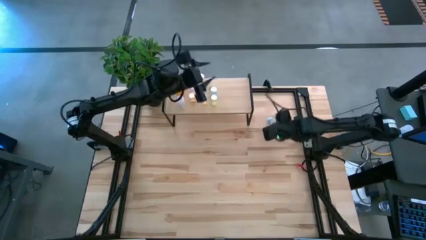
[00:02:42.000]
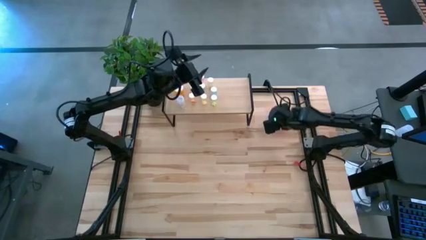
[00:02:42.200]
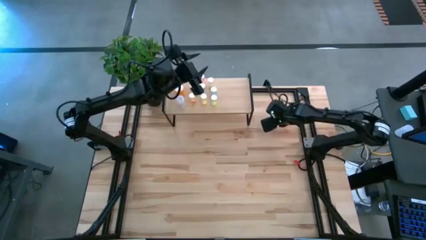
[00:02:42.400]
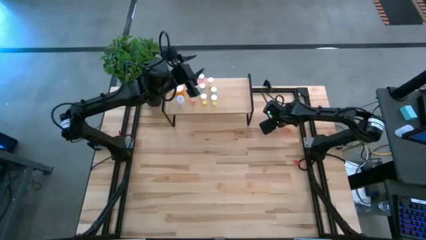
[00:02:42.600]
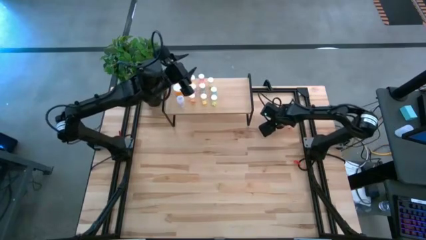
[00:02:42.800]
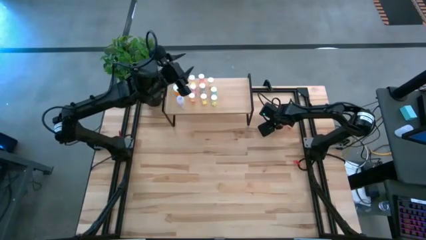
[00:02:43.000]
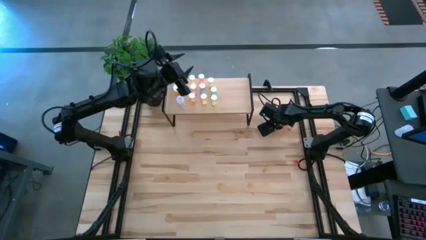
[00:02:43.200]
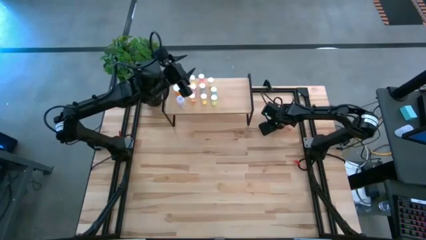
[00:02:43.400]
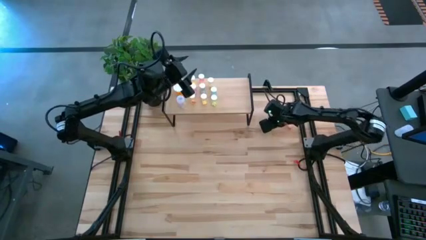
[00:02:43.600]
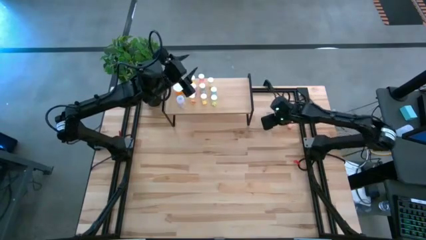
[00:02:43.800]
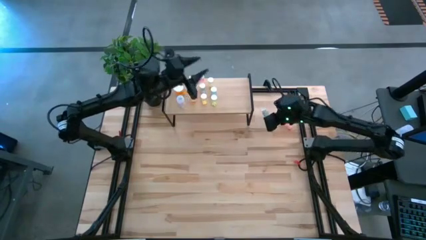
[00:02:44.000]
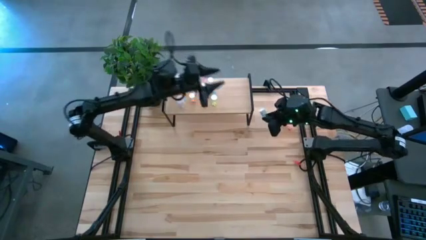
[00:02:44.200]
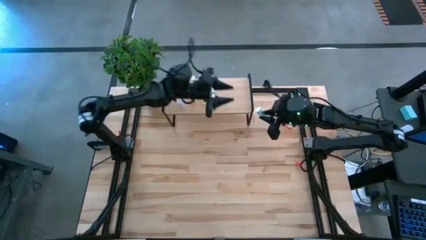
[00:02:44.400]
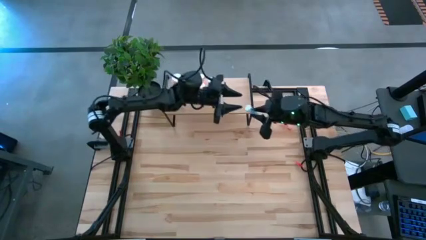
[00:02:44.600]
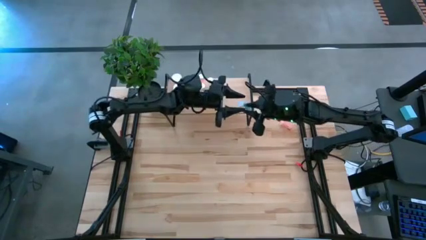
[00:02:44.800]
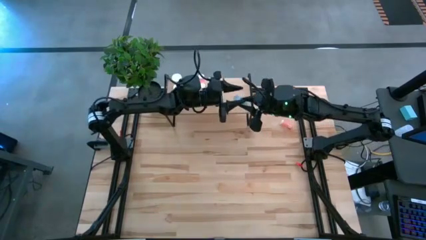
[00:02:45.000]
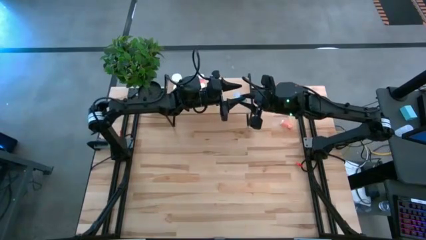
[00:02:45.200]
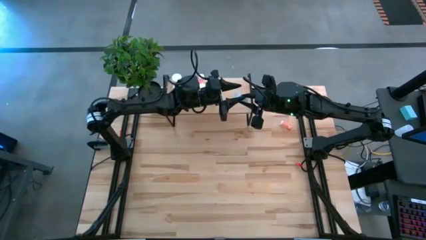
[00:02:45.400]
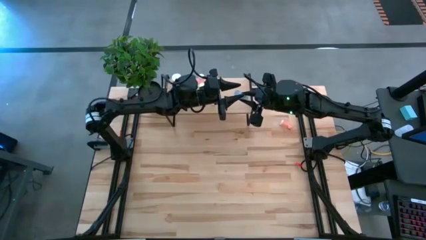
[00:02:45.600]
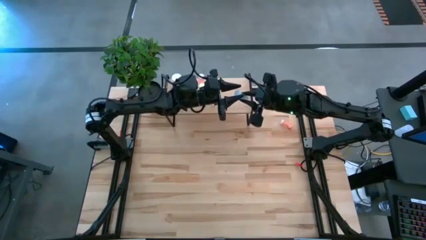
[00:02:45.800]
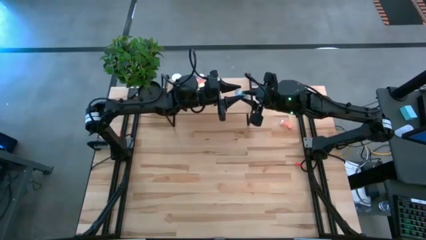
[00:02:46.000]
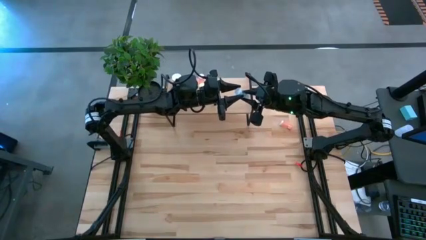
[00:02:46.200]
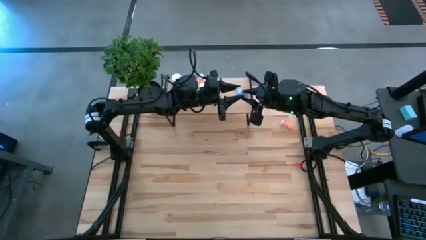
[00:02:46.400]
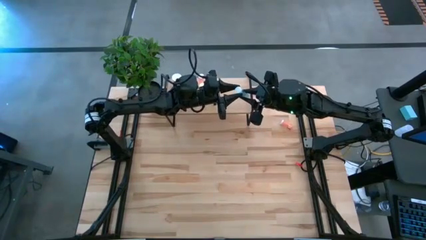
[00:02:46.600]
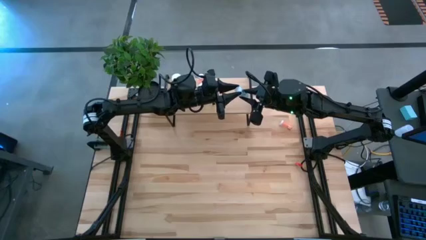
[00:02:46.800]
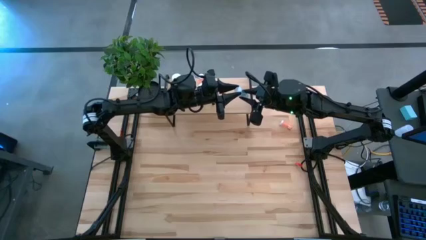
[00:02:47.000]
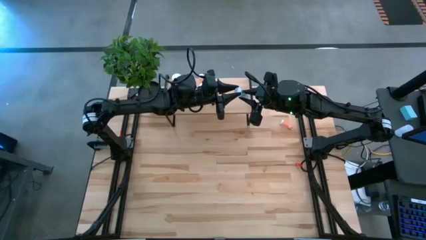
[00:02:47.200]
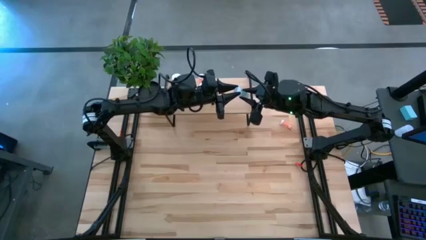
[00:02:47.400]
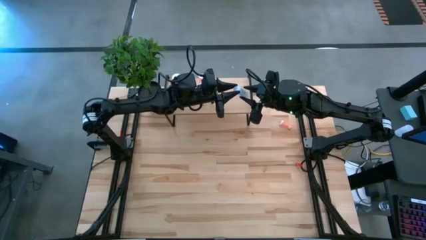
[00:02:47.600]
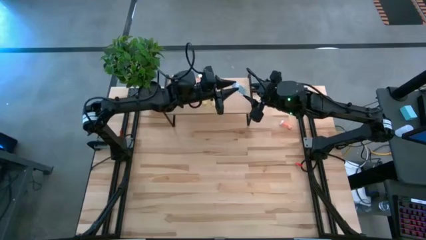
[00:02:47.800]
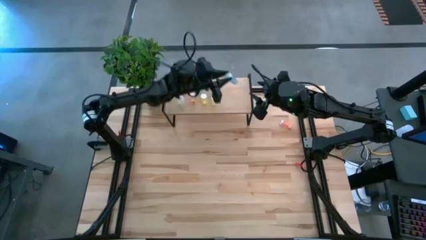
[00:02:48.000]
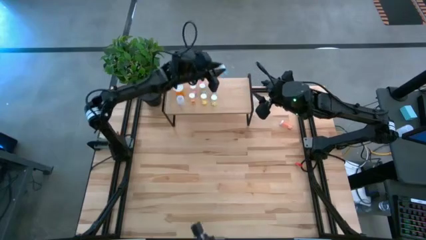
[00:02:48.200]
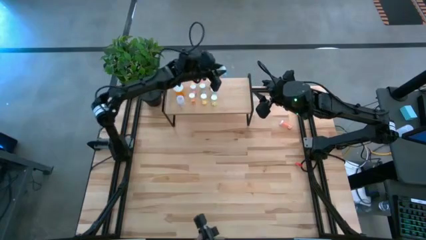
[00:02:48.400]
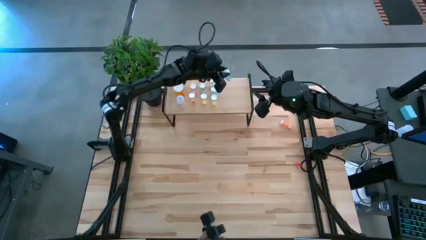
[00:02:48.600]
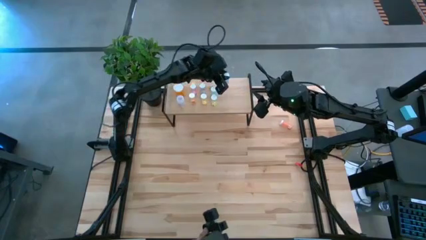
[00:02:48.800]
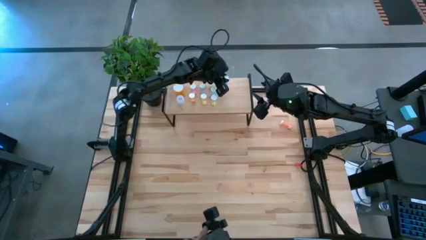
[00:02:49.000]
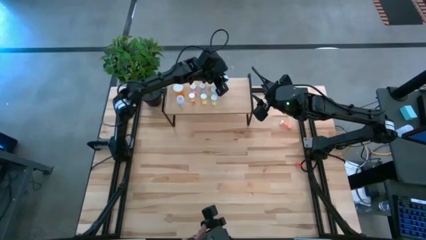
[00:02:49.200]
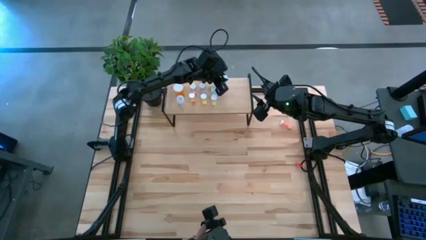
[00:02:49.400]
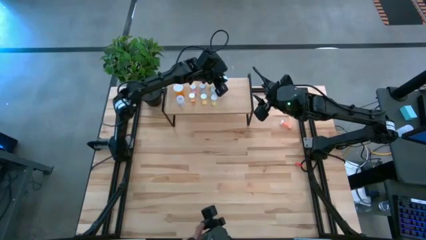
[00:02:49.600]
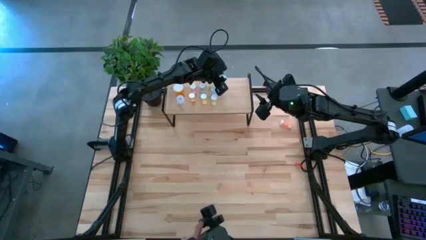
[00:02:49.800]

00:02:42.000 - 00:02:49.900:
Task: Pick and place medicine bottles onto shelf by color
Put the blue pill bottle on the shelf

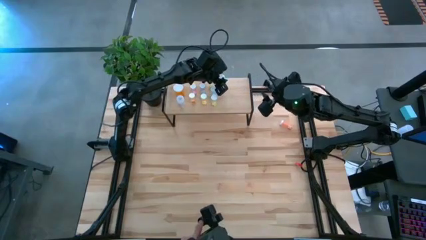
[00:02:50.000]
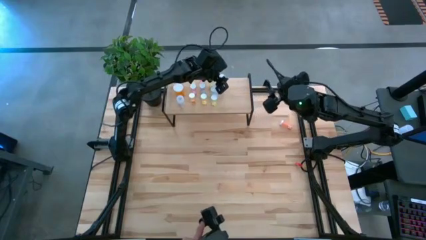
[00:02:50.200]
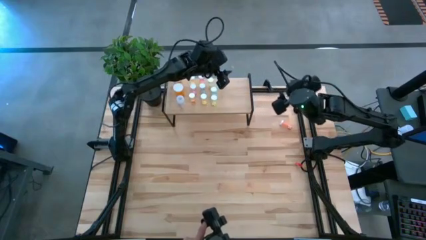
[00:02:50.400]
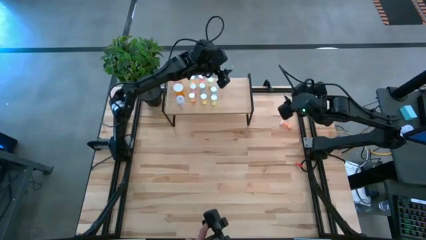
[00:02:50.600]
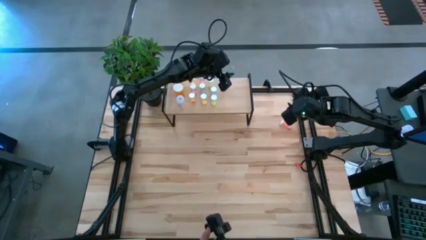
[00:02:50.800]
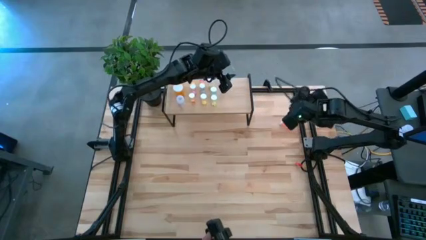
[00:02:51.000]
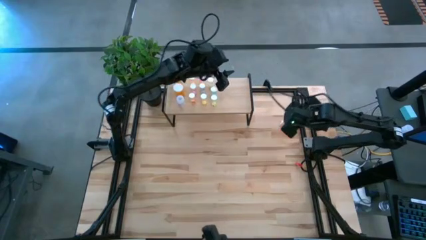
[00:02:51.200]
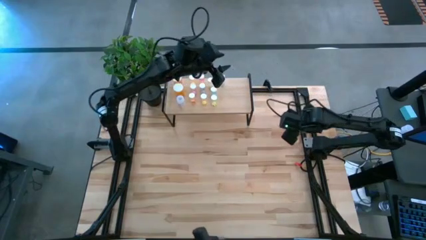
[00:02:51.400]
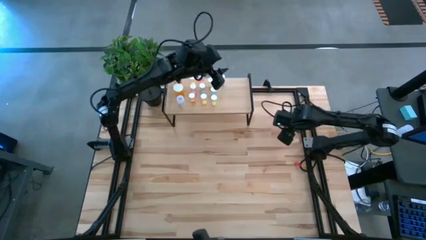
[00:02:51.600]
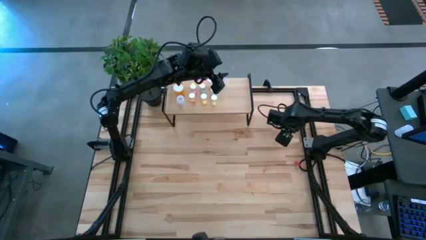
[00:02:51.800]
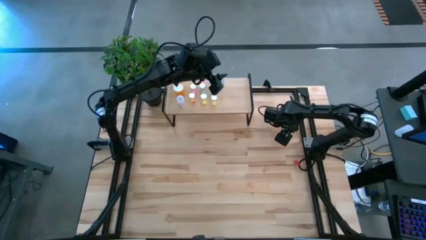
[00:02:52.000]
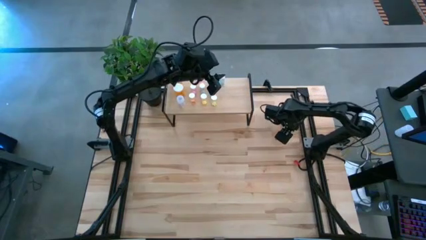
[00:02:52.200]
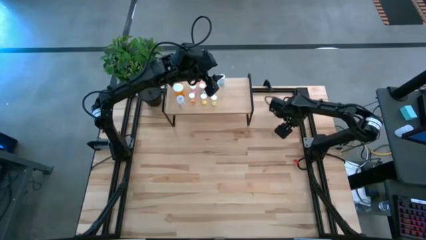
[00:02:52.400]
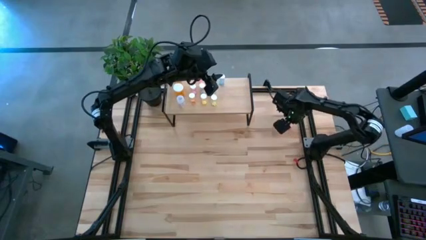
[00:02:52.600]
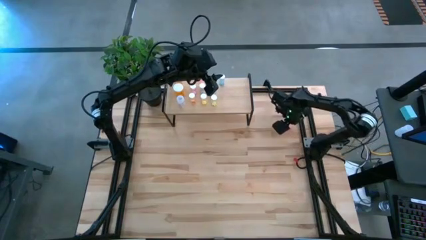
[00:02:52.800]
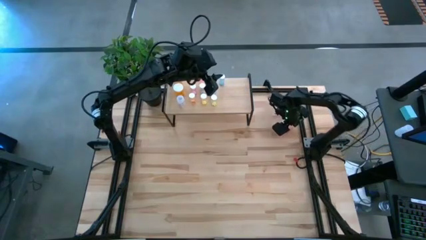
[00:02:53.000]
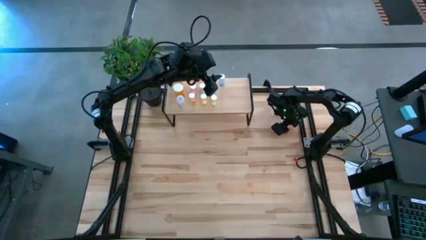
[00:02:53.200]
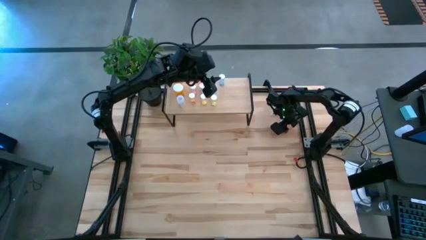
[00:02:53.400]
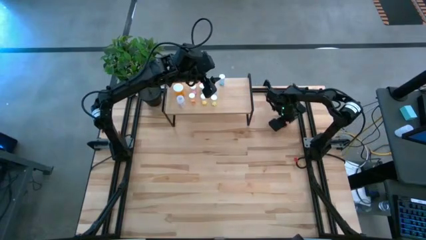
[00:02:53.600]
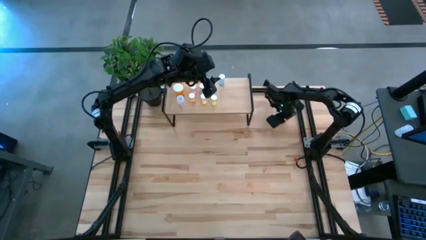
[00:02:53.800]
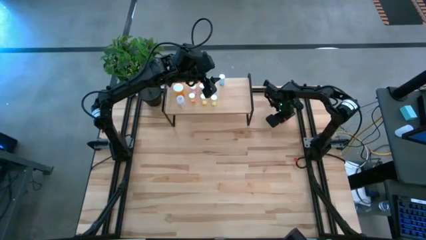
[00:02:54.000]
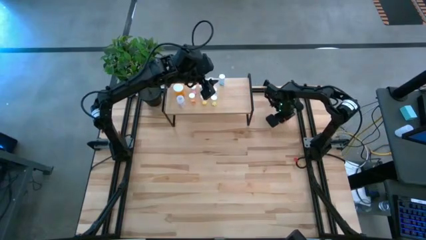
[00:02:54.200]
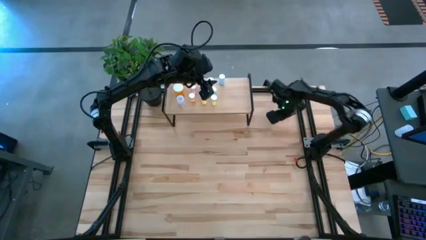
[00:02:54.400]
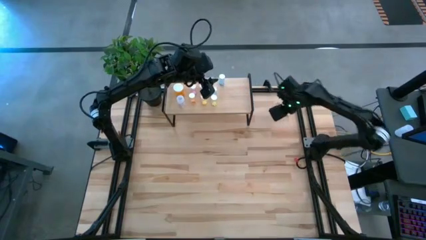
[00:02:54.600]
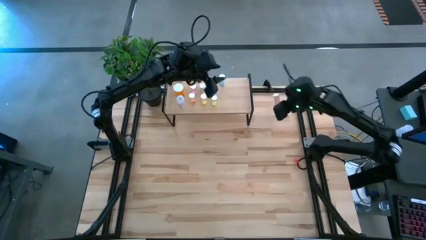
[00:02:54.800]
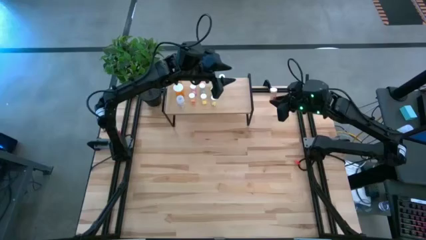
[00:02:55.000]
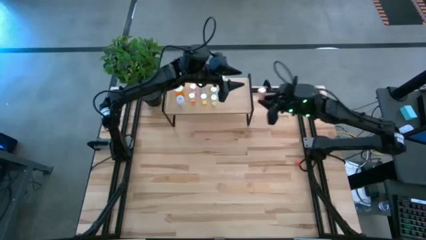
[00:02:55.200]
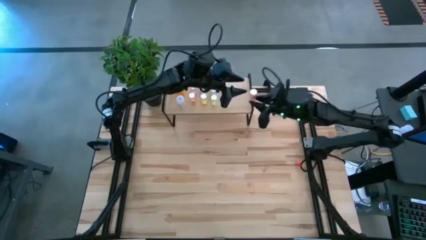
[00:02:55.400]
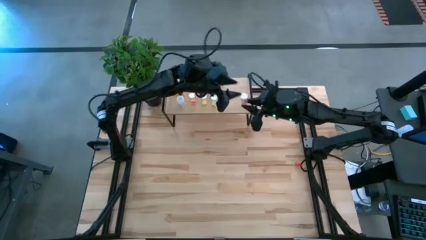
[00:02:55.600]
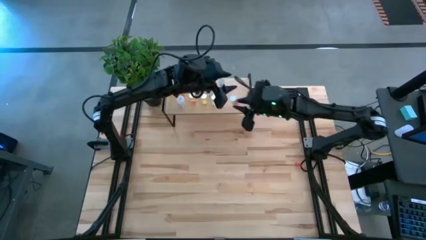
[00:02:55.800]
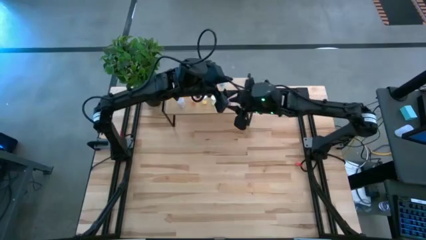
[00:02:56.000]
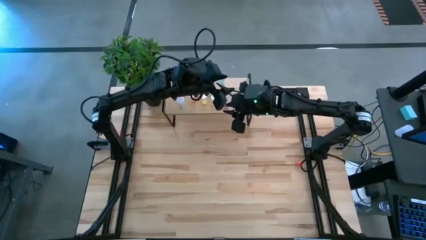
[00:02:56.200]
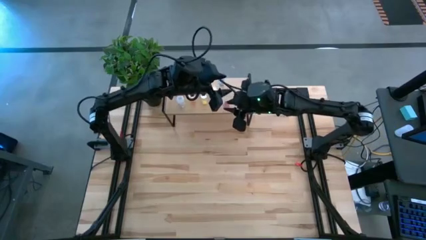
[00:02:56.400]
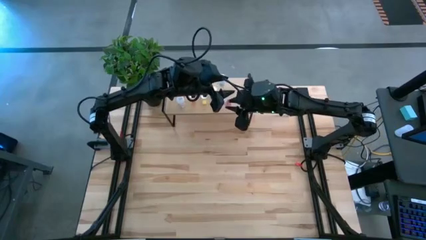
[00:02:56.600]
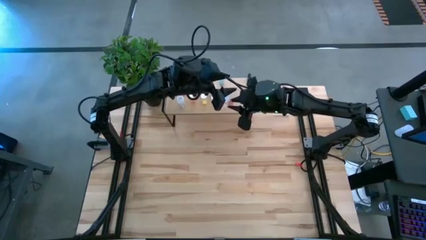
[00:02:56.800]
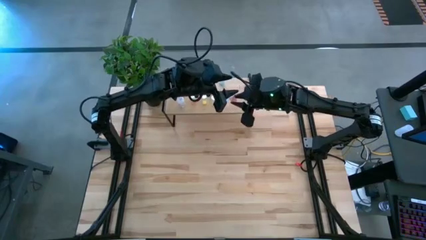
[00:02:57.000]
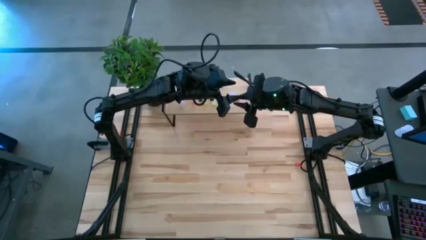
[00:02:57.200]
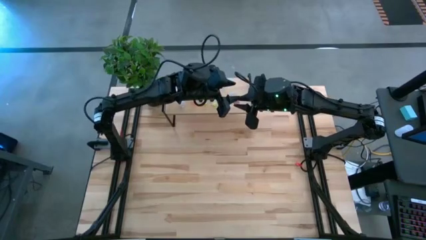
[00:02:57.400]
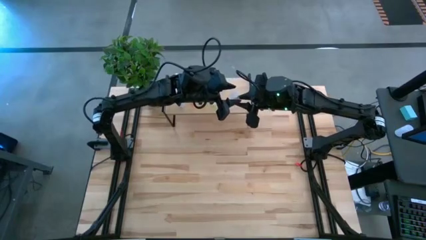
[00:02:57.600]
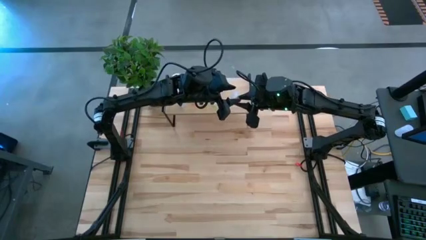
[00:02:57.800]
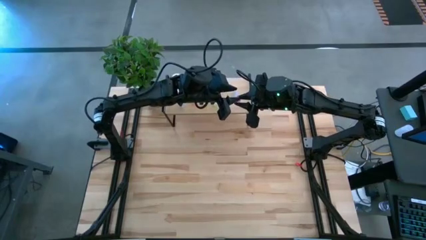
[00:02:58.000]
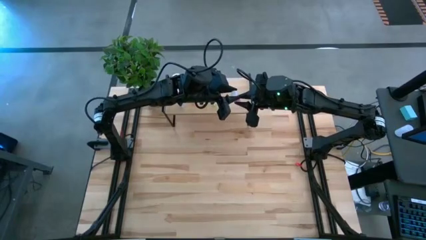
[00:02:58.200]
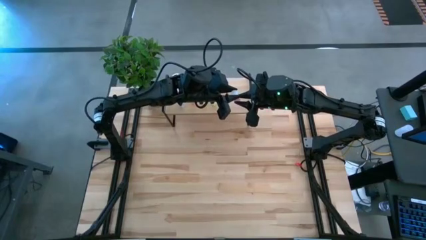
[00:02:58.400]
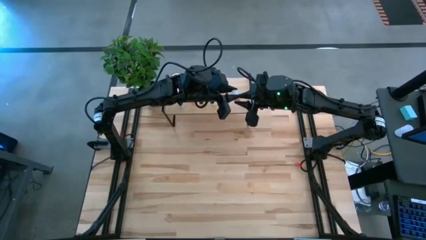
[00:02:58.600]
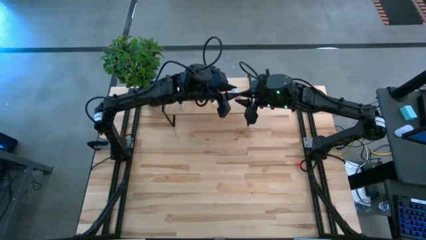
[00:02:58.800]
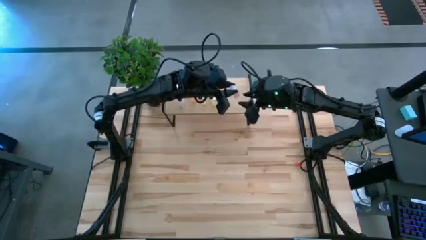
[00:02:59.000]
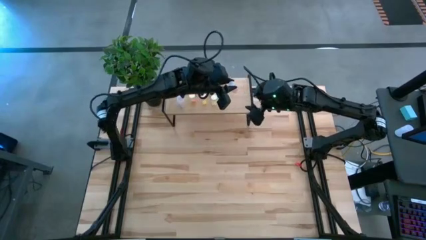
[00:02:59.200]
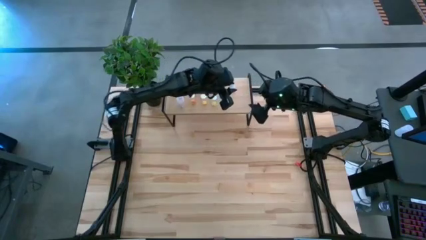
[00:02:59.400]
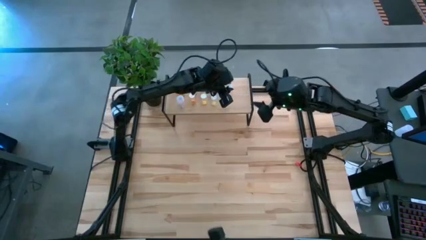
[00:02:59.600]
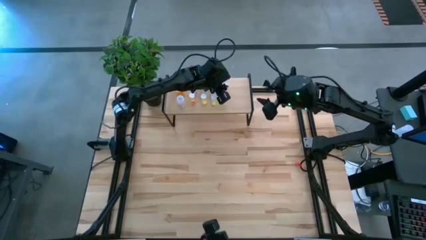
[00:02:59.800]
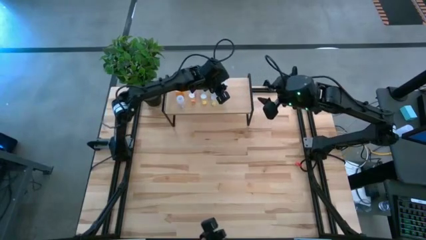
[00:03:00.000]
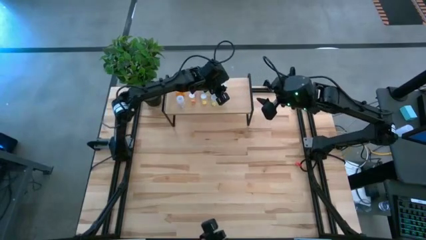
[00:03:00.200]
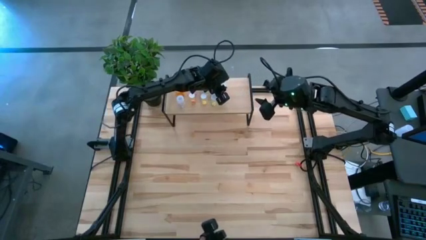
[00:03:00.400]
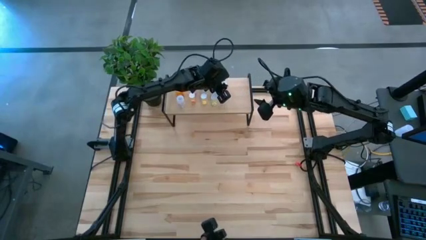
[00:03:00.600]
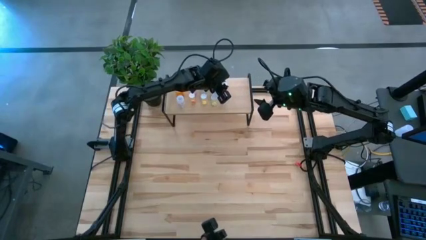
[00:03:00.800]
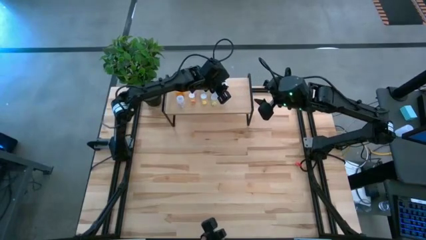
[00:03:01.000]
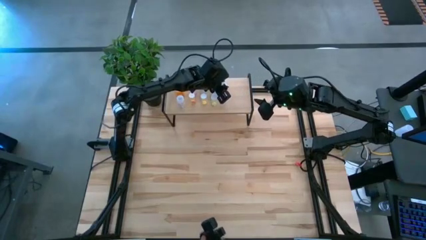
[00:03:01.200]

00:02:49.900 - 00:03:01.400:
Put the red pill bottle on the shelf
